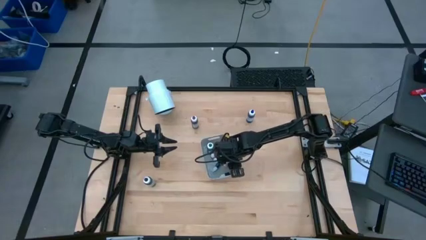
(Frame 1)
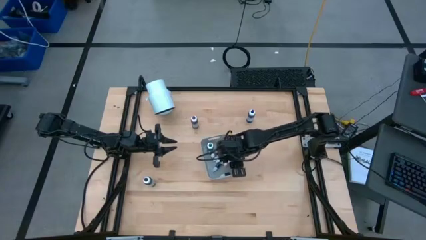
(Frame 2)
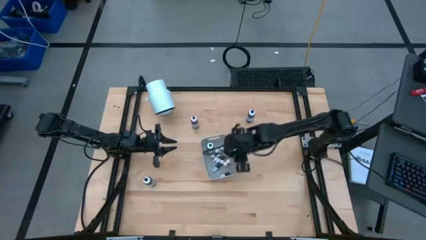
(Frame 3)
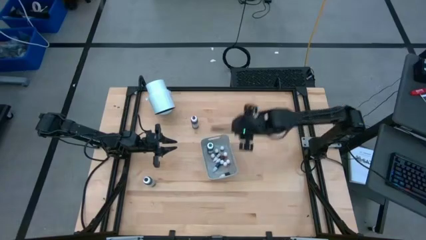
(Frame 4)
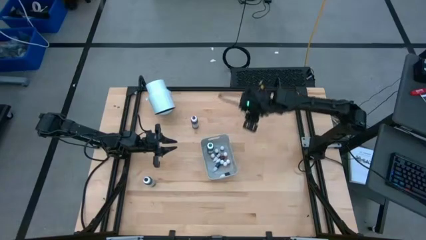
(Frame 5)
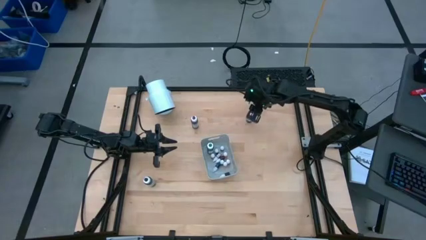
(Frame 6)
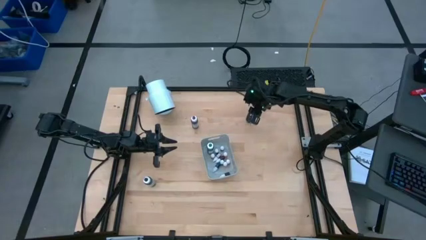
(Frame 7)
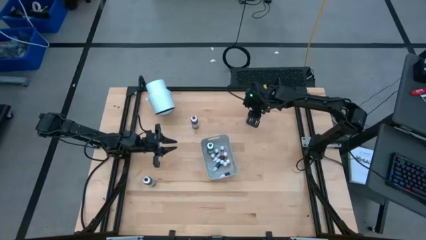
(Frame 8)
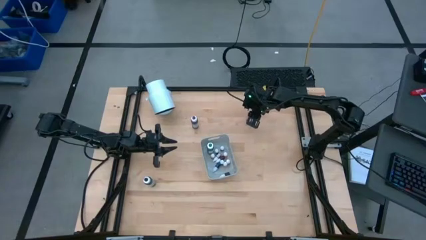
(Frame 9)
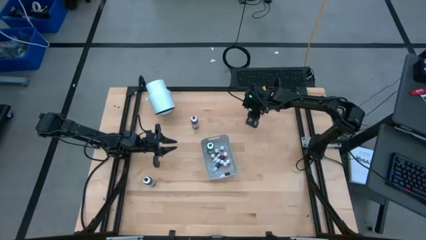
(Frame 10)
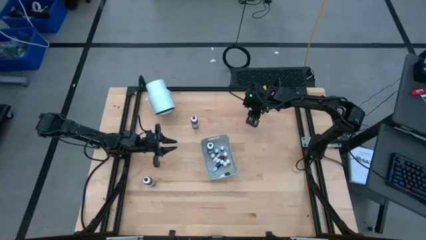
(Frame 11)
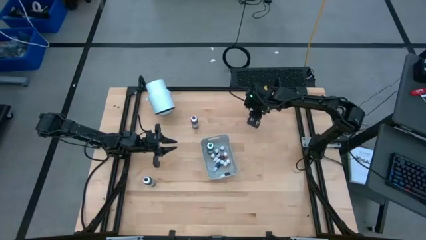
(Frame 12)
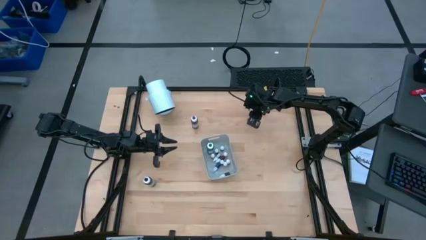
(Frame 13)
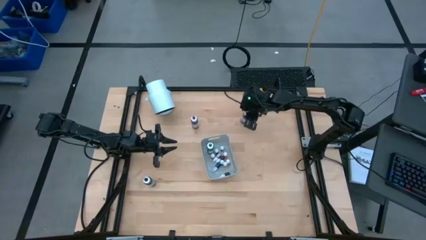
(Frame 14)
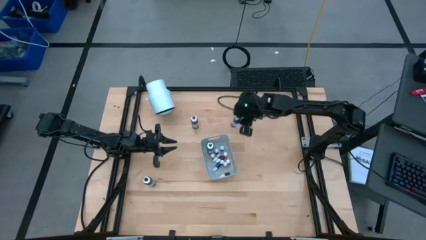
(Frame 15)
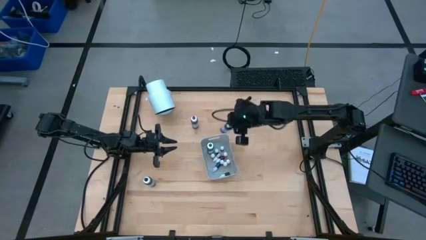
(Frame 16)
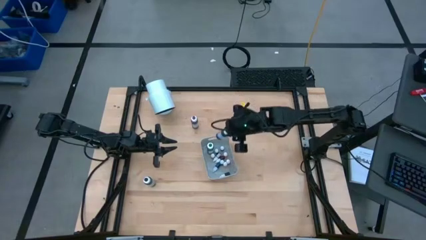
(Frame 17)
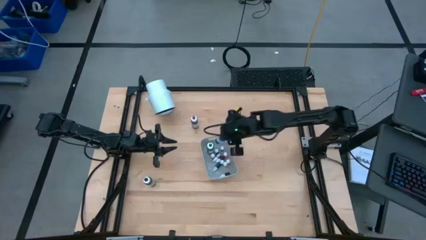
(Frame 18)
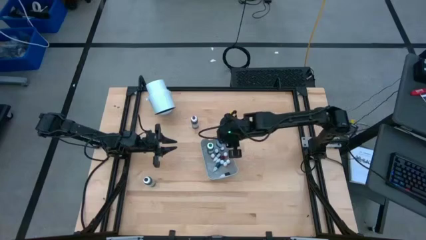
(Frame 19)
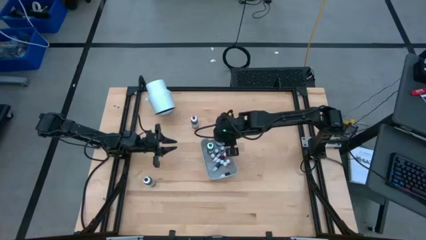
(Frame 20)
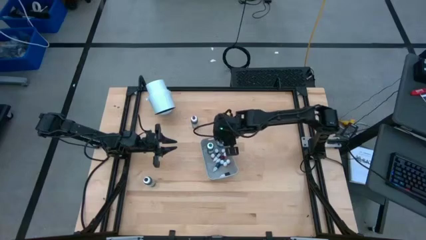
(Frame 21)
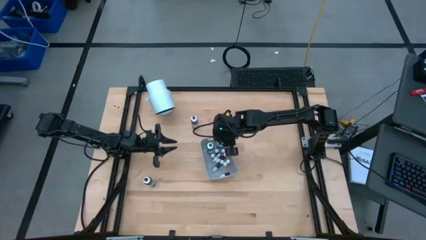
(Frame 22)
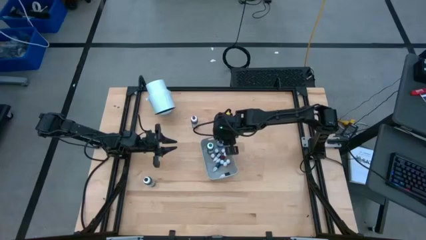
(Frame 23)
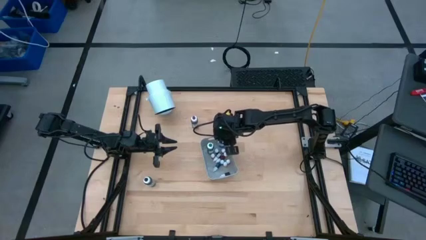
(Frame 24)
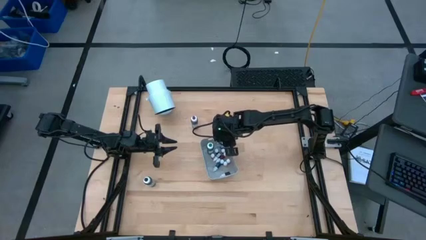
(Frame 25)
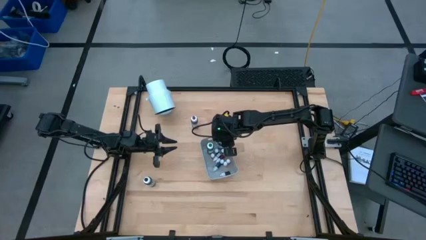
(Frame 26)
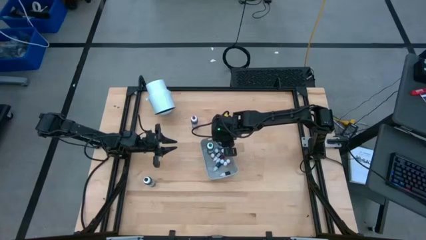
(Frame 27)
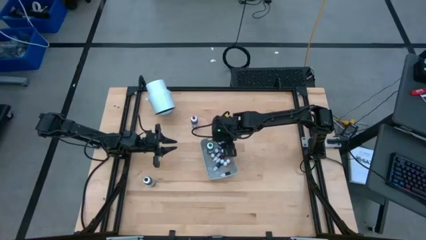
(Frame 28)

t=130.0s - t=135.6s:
Task: Pick & Place food coloring
Put the big blue food coloring bottle into the bin

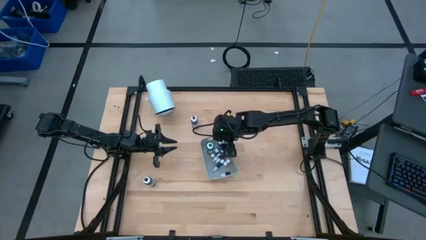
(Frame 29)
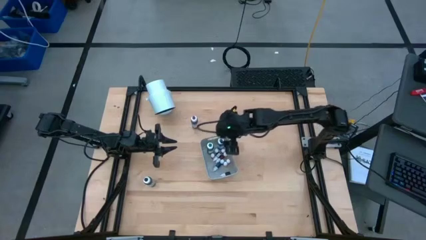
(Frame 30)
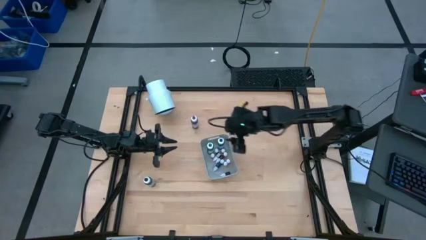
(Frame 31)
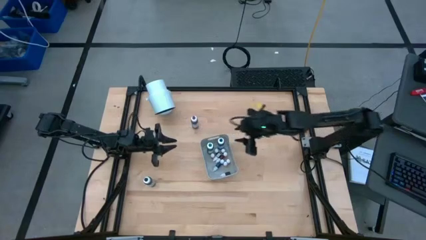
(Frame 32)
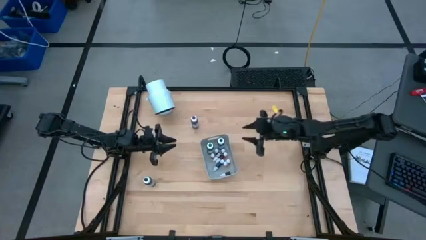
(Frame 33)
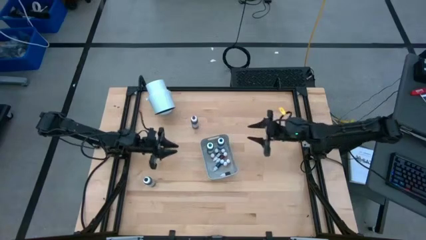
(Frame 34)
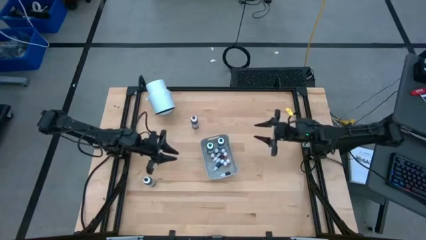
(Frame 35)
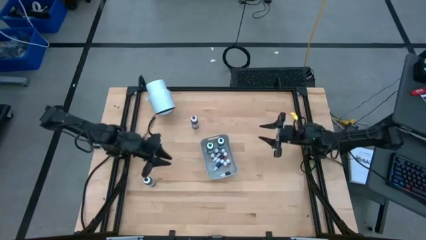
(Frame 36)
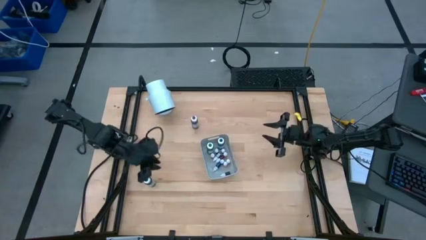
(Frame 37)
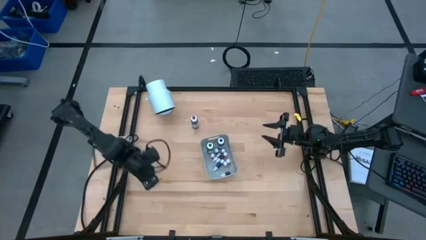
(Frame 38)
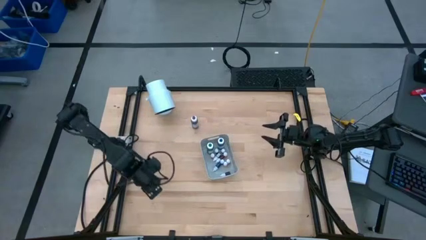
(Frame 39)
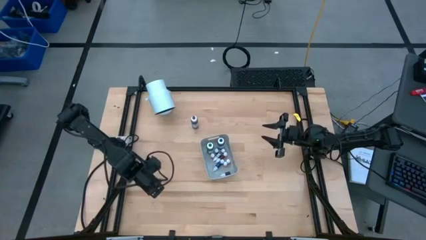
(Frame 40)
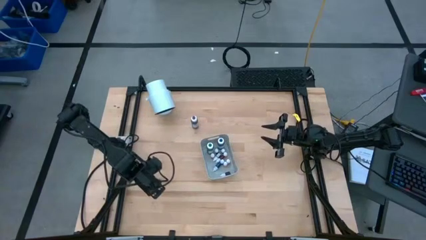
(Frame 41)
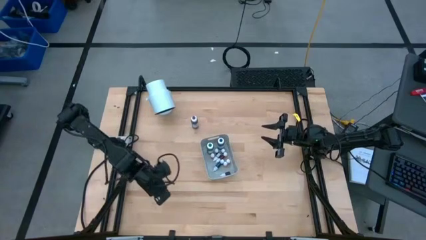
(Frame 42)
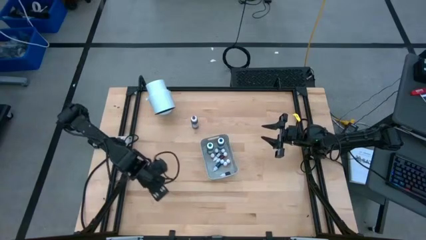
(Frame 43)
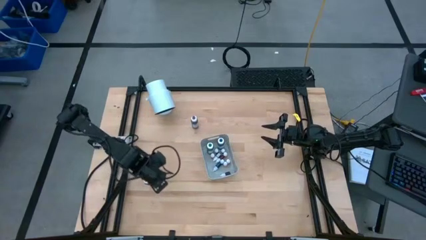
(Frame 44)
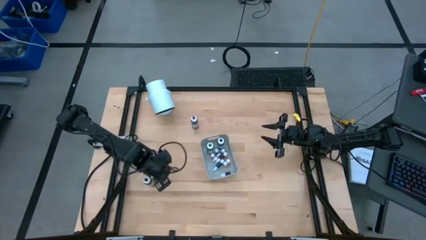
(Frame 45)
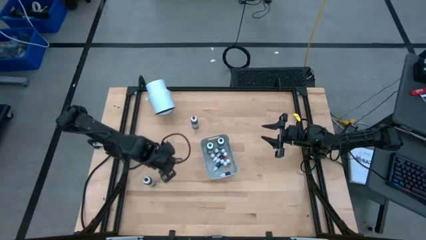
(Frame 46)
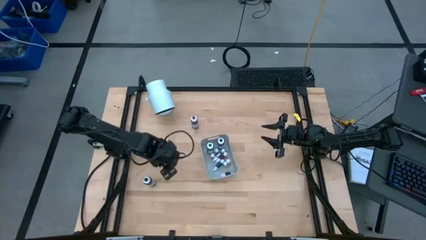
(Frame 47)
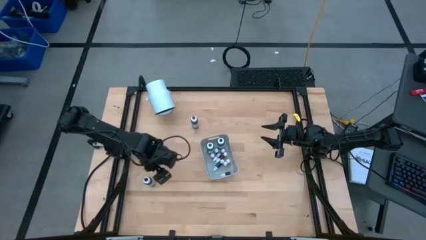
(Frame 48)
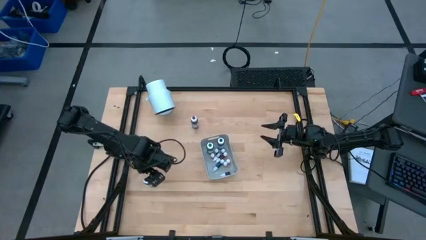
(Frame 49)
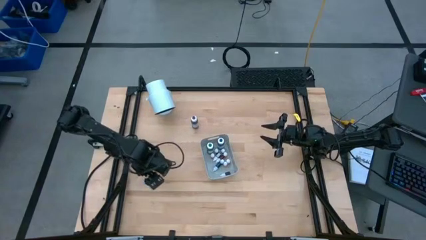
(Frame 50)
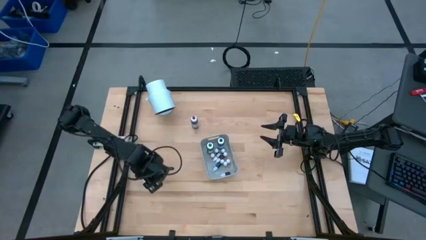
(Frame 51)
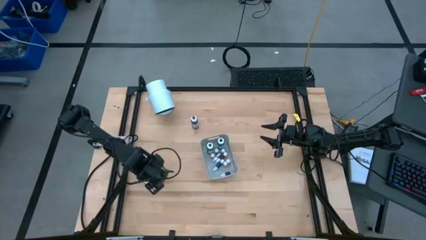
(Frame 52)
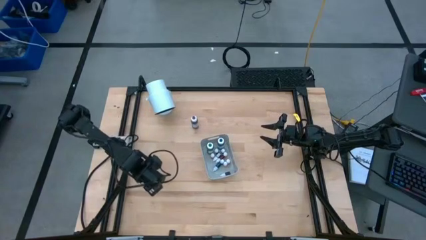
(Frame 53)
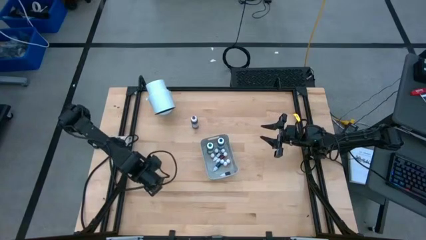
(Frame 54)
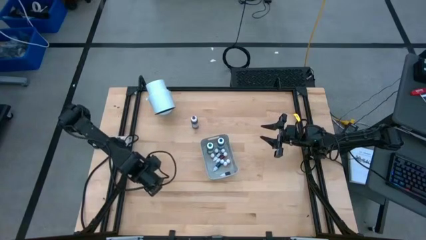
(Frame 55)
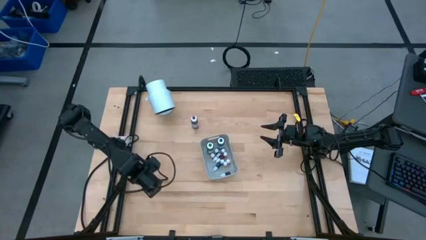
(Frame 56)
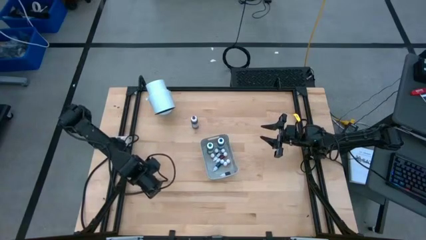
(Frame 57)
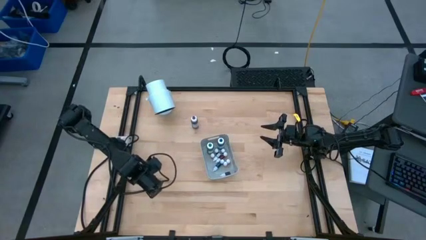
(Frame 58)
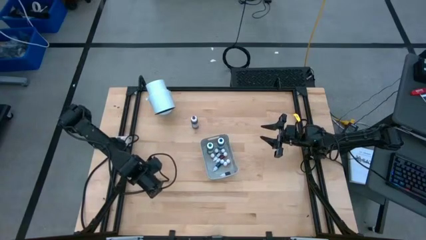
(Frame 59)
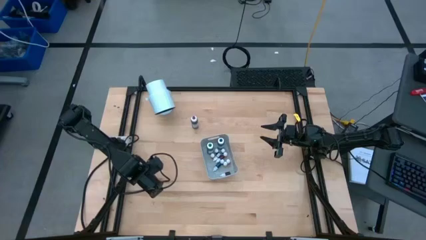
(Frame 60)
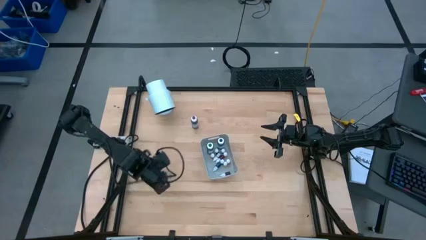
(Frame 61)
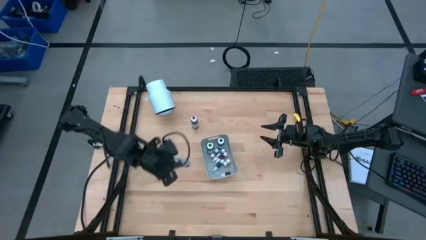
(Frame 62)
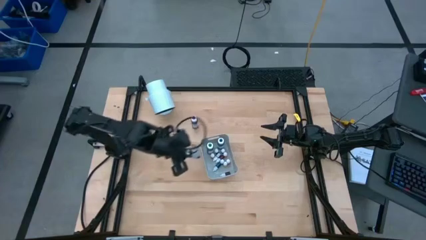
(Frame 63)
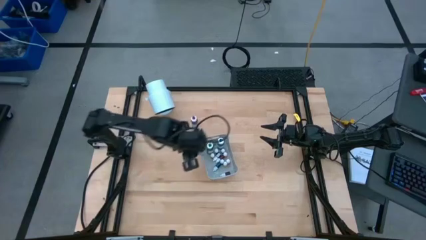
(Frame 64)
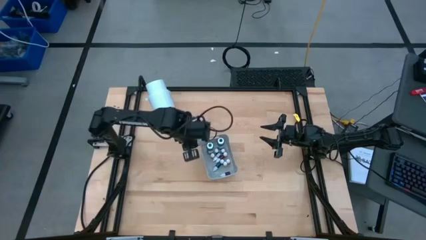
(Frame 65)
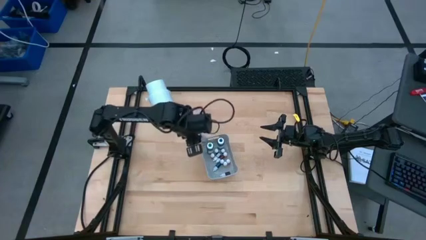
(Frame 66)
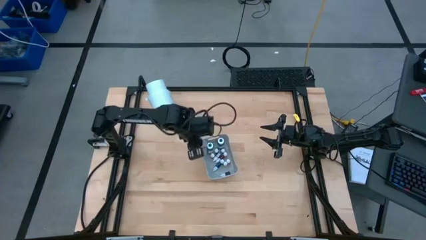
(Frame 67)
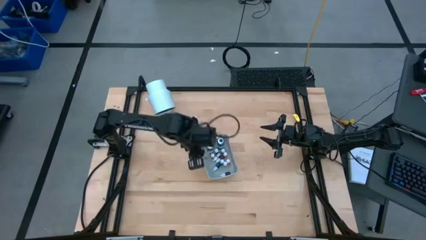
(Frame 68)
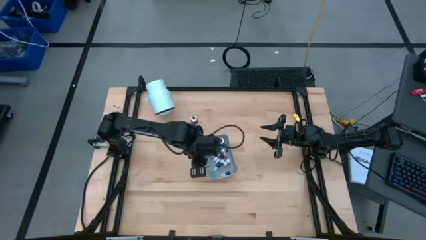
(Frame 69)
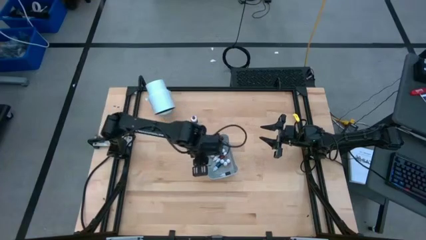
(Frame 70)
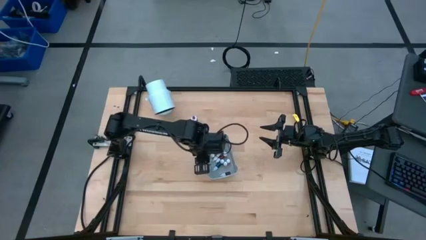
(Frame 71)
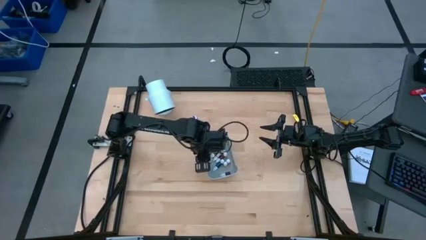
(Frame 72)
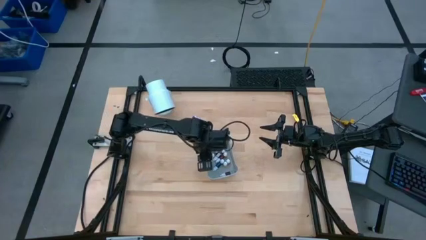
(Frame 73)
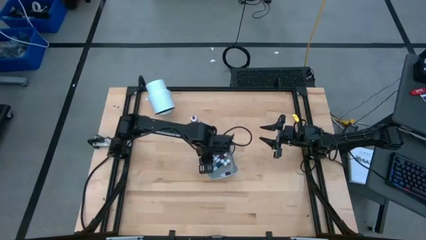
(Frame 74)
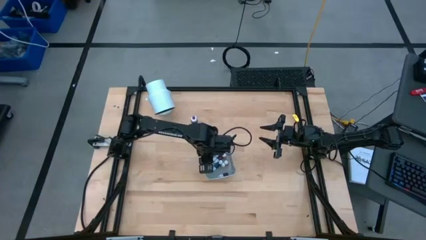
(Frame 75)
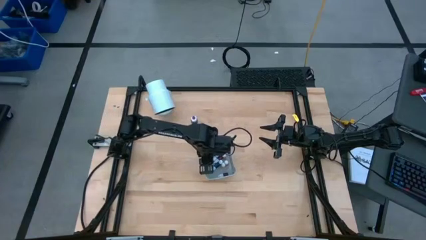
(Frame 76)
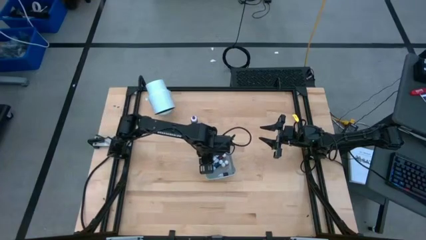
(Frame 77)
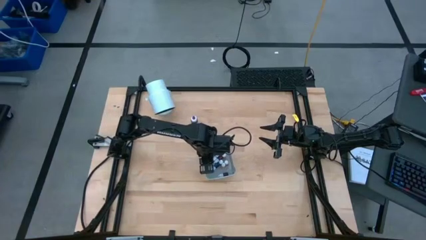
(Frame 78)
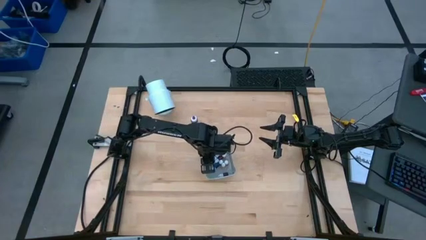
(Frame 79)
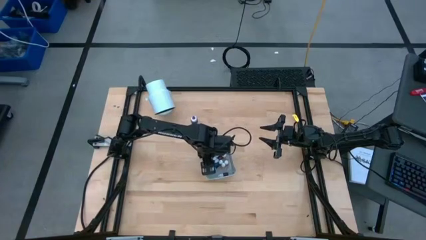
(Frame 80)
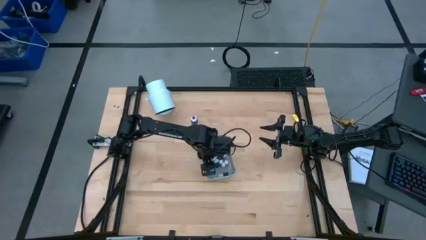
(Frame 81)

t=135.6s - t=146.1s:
Put the black food coloring bottle into the bin

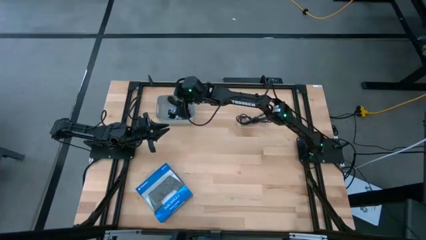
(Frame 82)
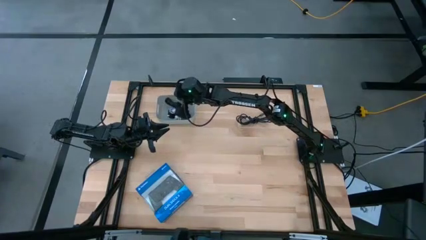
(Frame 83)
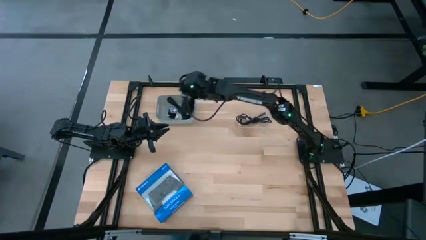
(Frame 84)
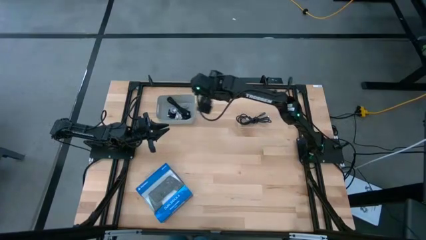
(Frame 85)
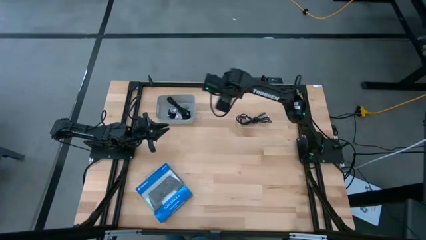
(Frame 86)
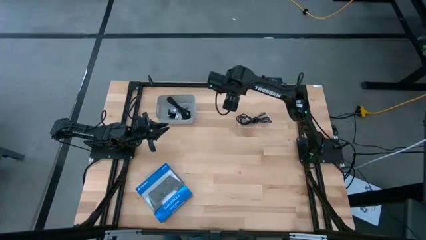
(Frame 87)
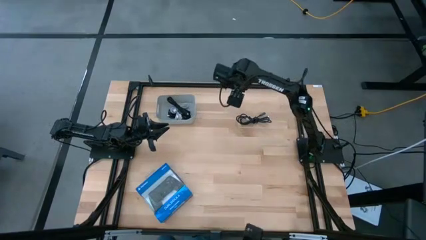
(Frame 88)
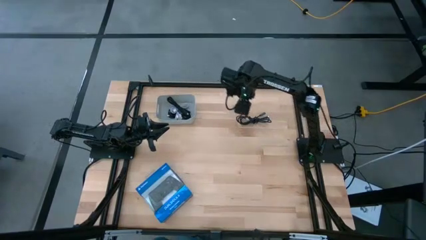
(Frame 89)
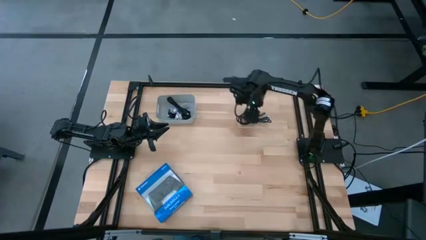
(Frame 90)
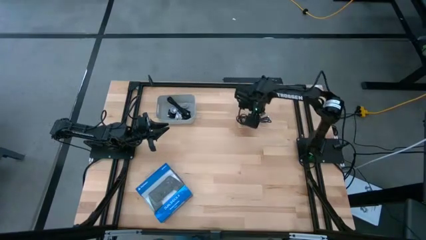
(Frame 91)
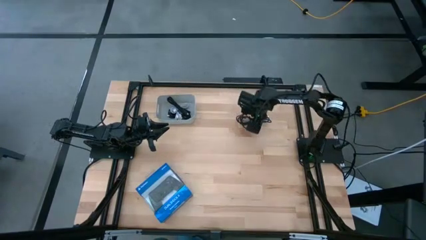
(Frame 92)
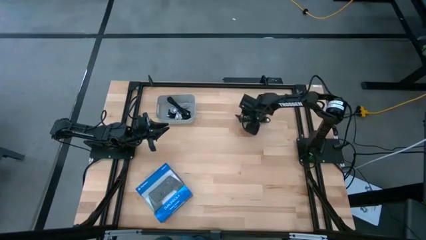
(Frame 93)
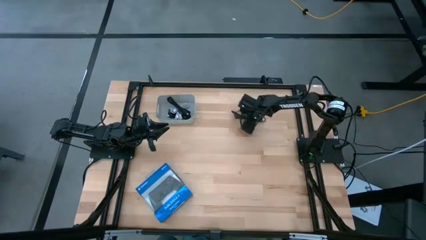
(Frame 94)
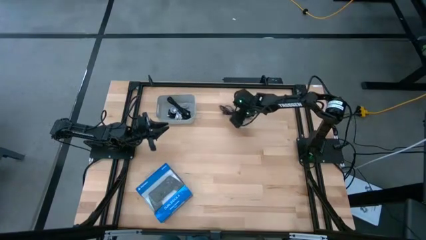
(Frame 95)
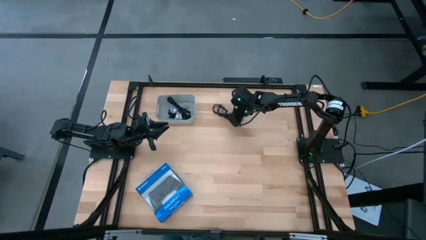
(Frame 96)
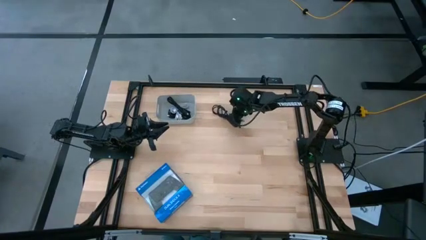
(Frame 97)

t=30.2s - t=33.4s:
Task: Pick and place USB-C Cables
Put the black gray charger cable into the white bin
